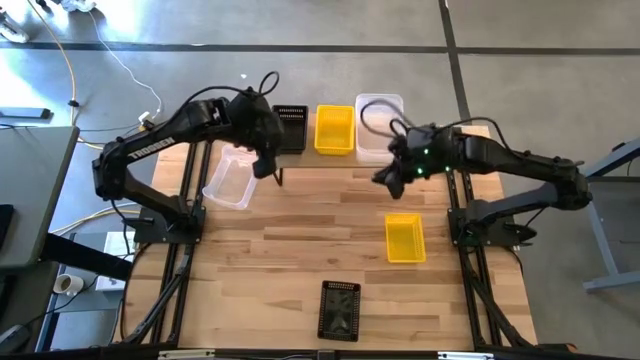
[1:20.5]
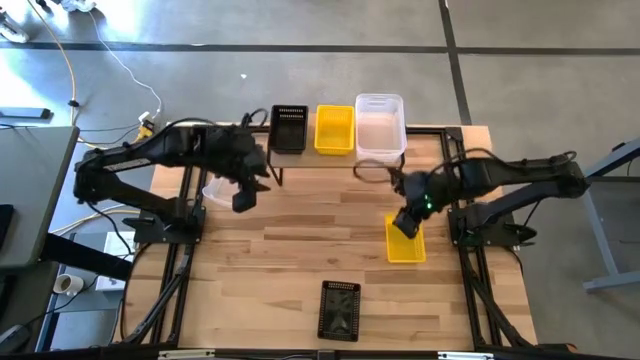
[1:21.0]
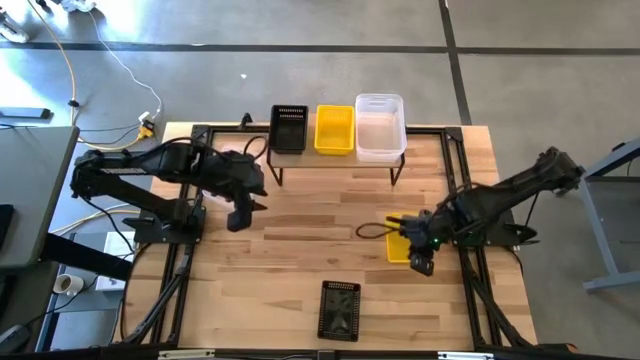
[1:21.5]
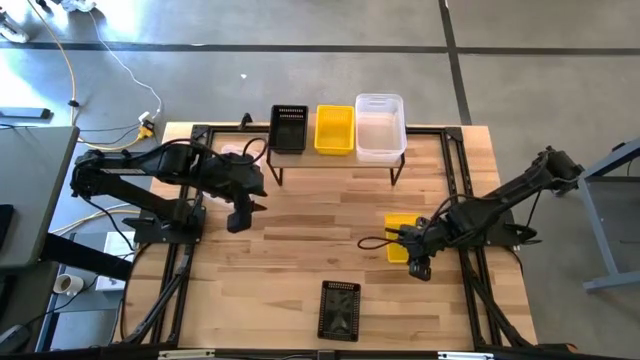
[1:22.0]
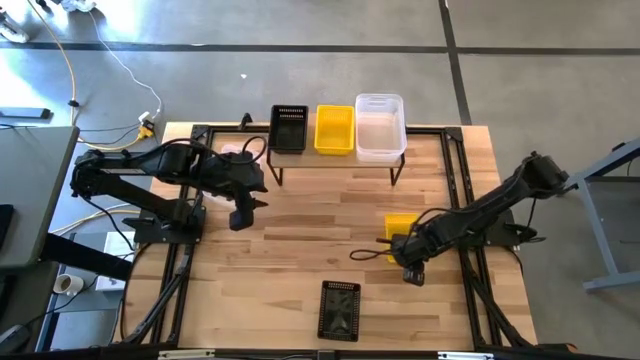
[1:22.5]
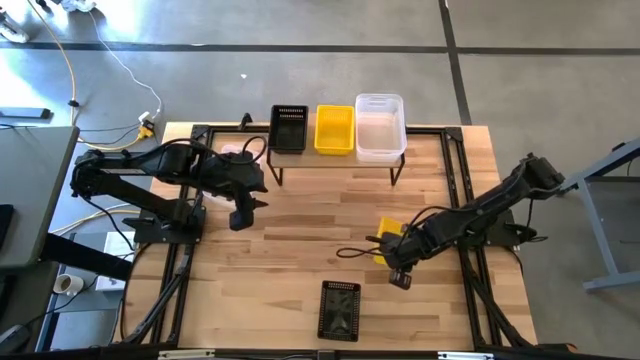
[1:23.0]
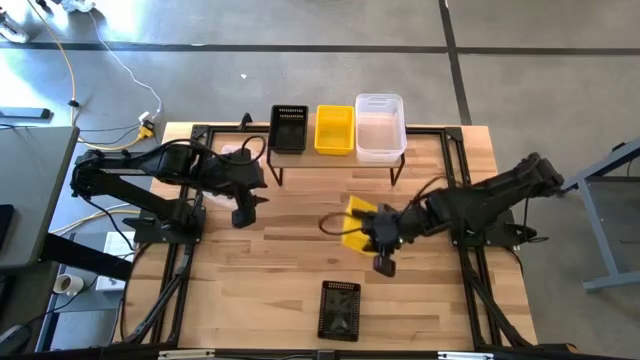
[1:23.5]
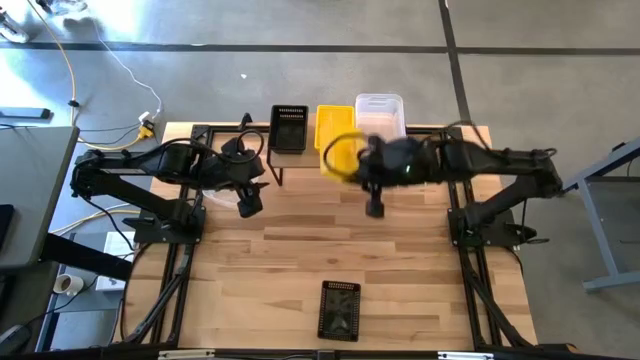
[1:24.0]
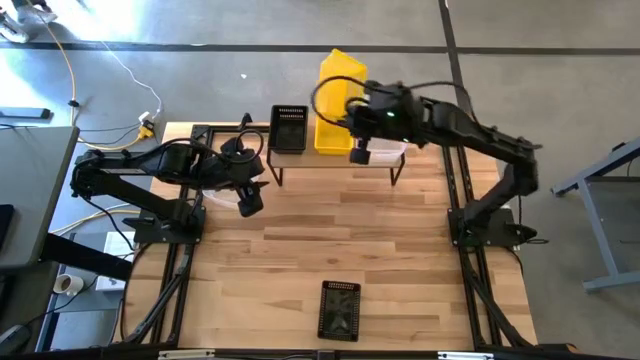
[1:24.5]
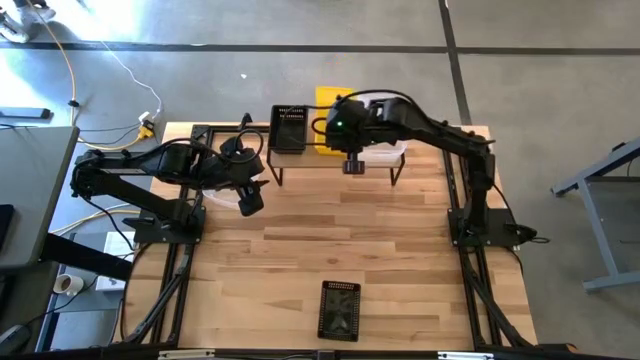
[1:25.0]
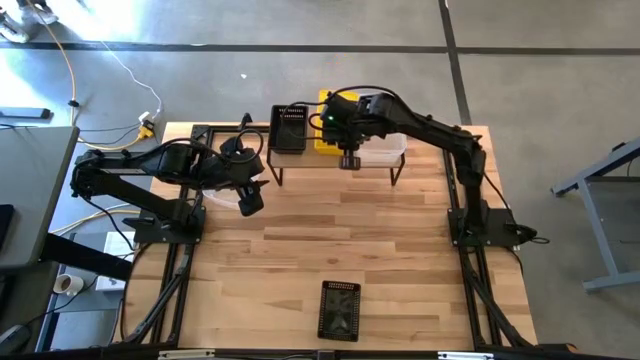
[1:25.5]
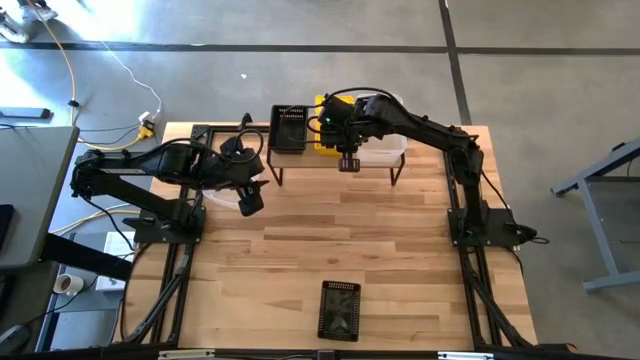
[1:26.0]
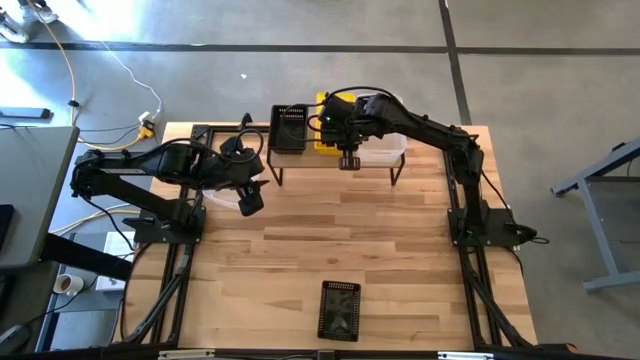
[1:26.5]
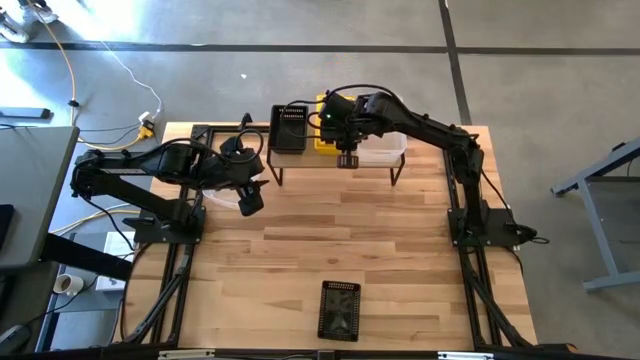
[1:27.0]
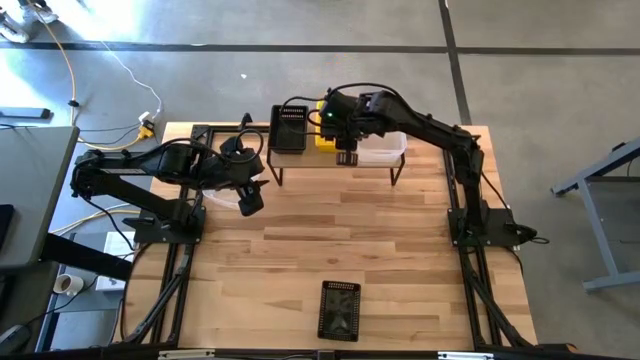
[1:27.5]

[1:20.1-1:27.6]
Task: Stack baskets on shelf by color
Stack the yellow basket on top of the yellow baskets on the shelf

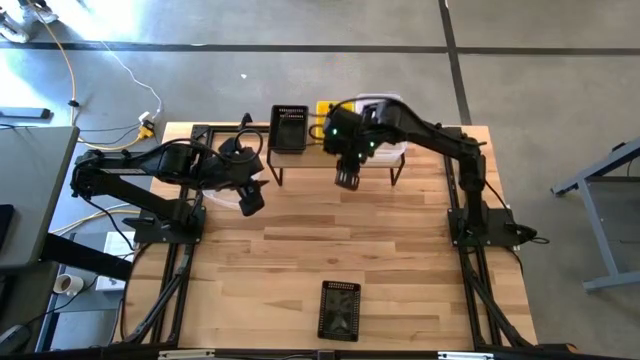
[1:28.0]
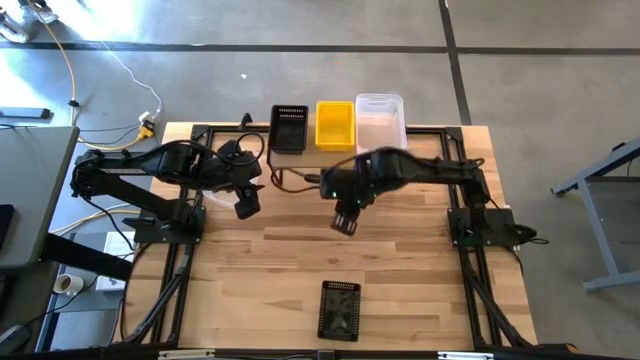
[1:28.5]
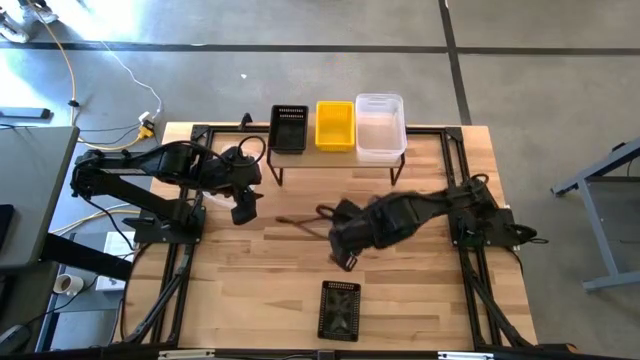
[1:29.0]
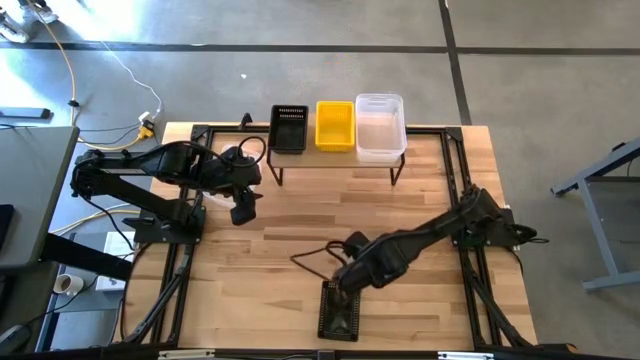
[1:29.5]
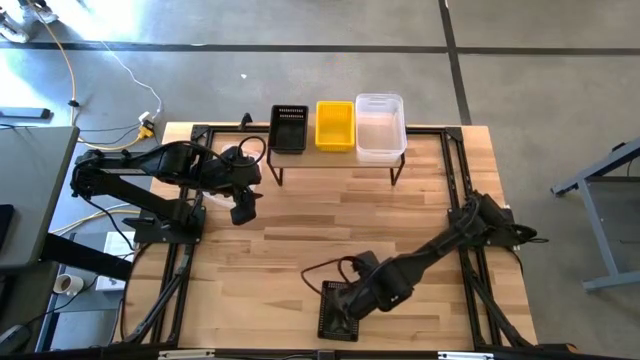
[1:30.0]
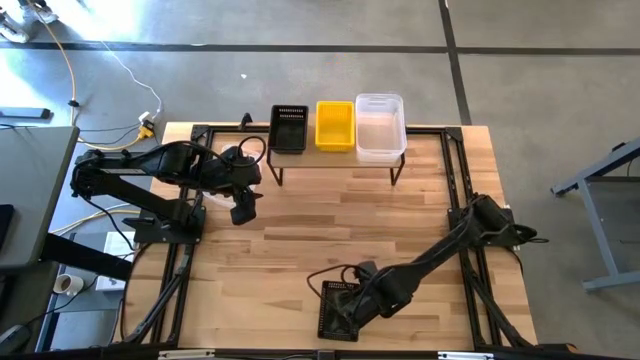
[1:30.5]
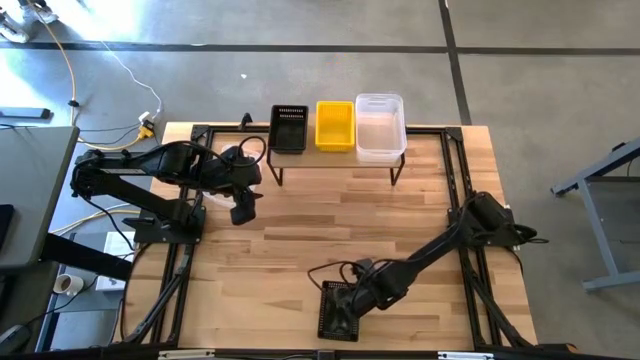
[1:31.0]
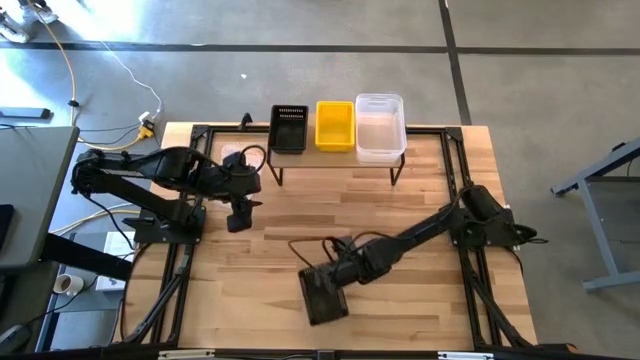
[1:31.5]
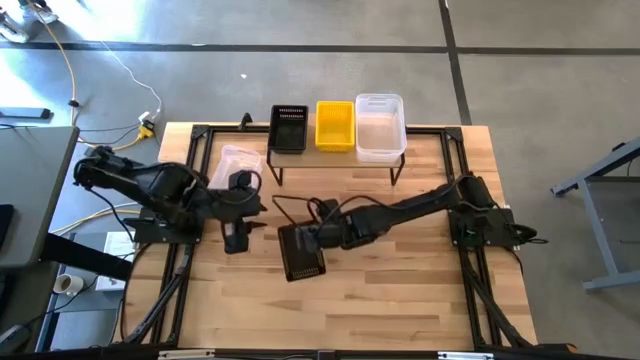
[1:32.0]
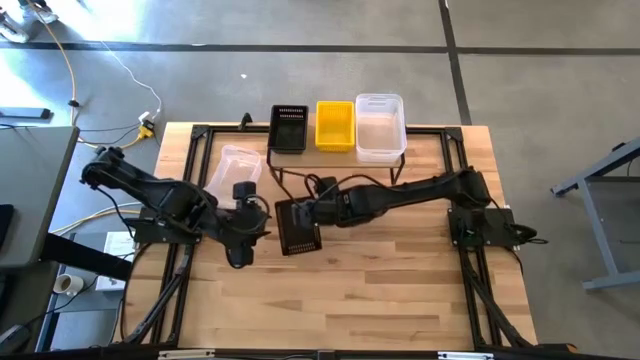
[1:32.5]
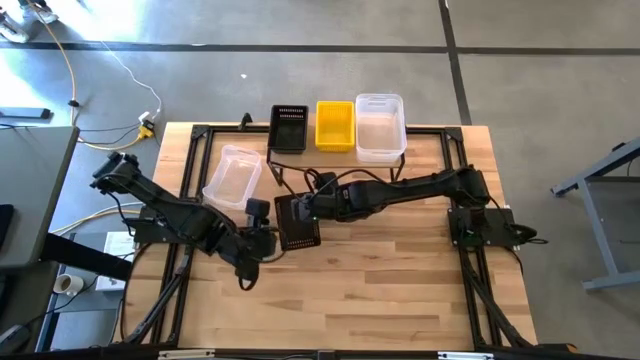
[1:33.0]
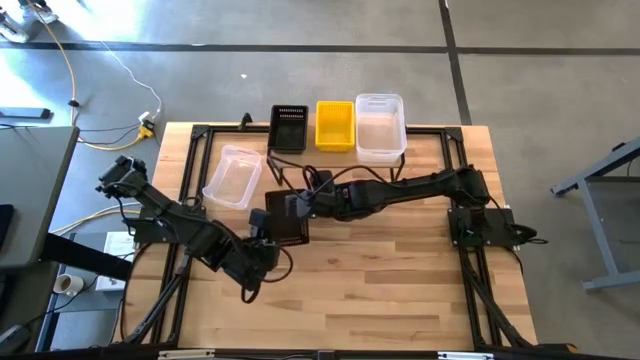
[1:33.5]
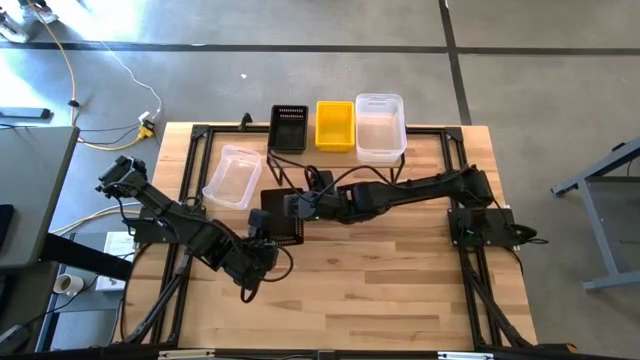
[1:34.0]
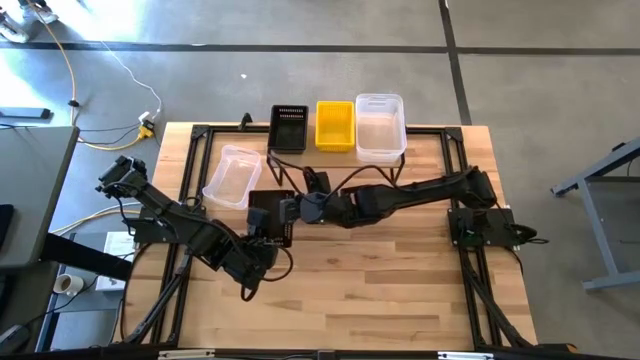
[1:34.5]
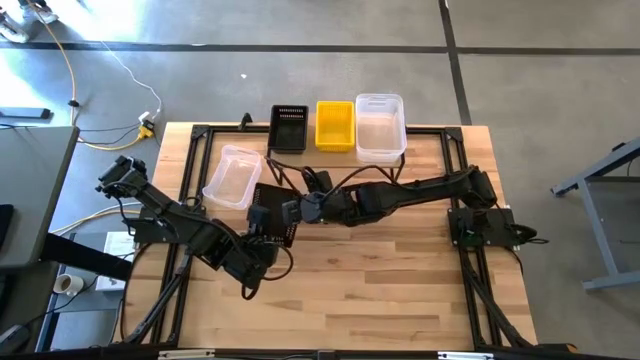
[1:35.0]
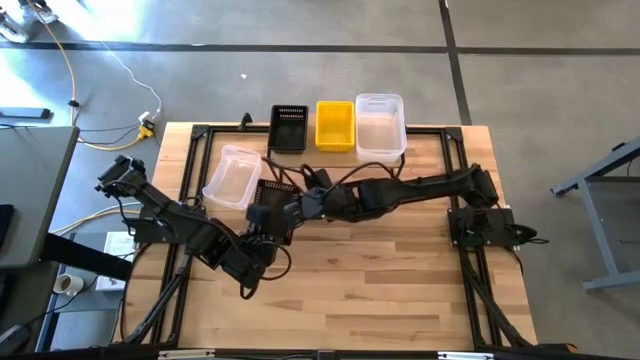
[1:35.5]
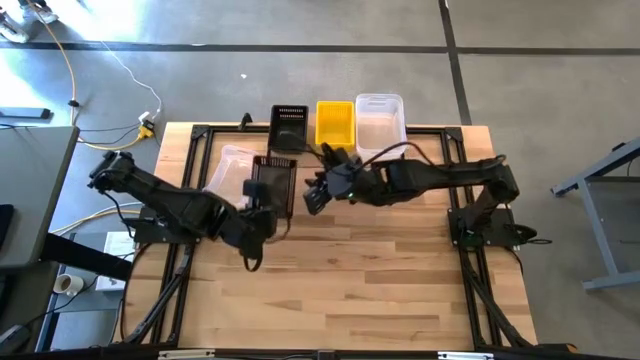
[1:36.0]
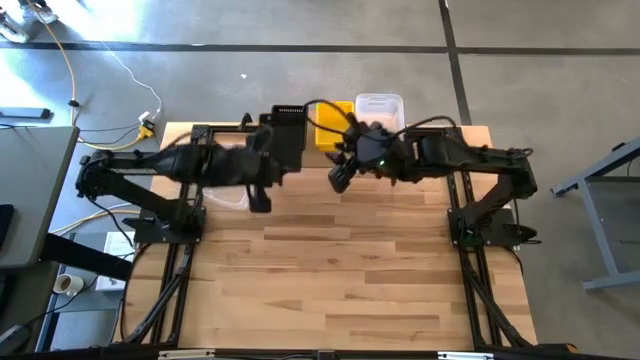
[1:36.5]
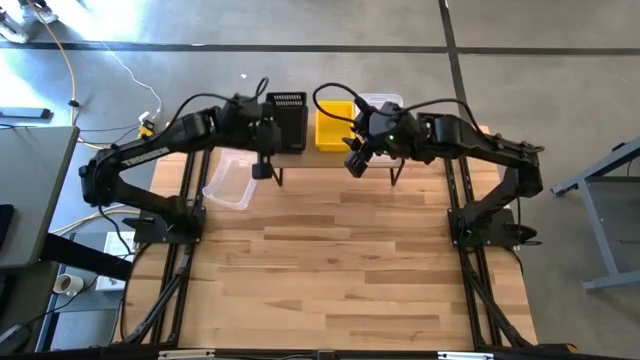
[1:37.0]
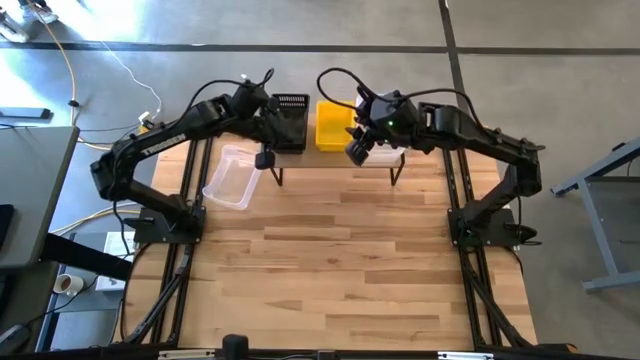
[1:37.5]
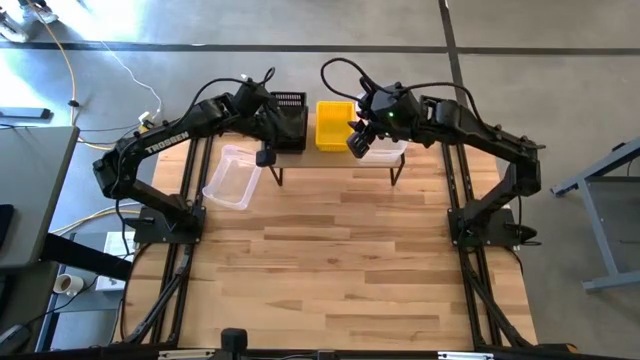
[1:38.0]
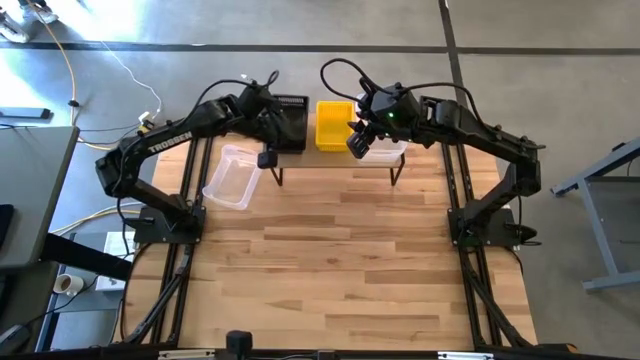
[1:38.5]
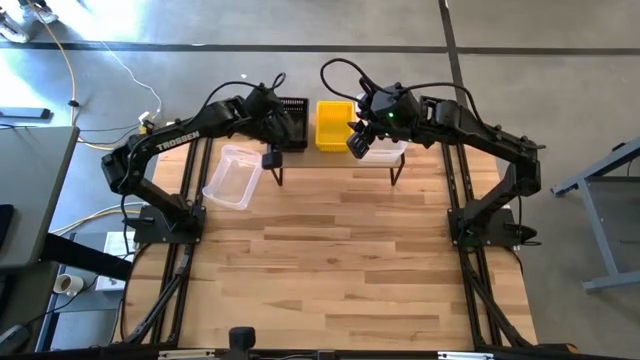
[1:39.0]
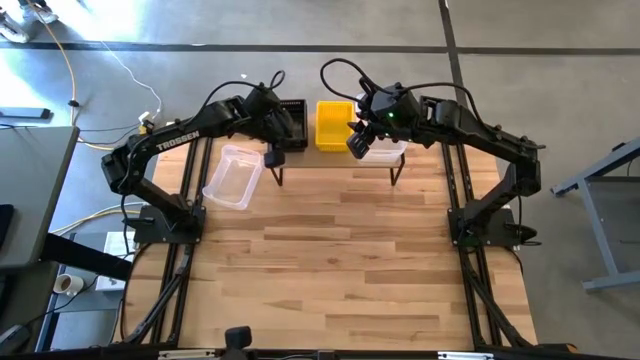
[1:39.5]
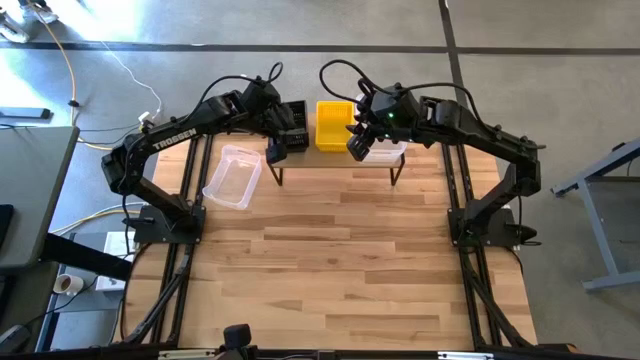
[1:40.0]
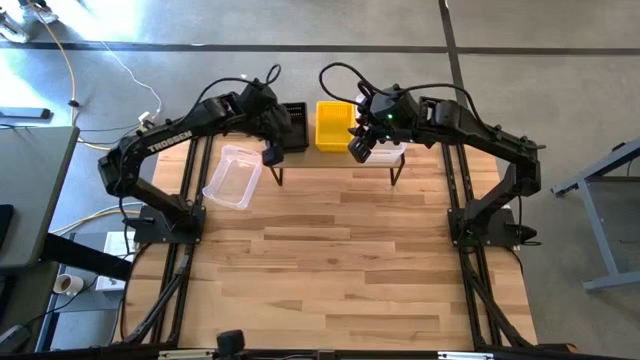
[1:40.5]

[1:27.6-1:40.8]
Stack the black basket on top of the black basket on the shelf

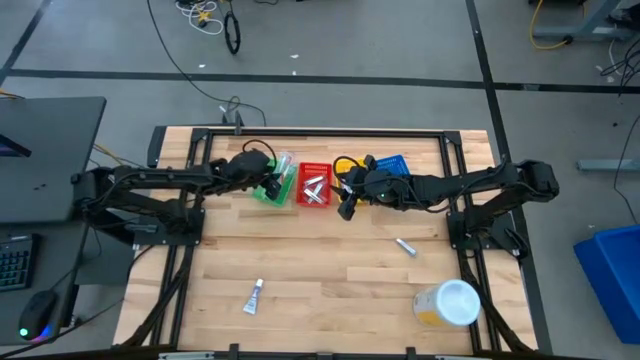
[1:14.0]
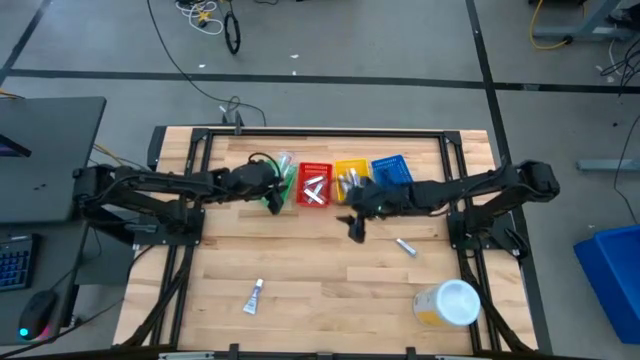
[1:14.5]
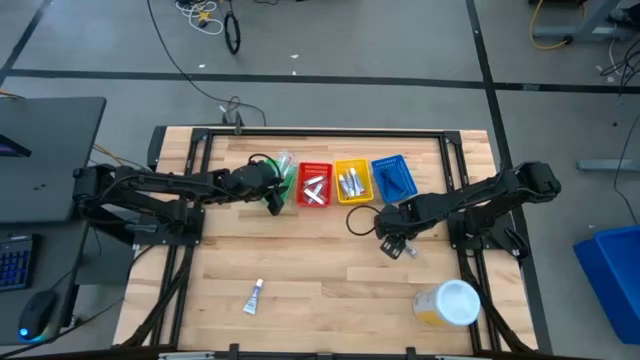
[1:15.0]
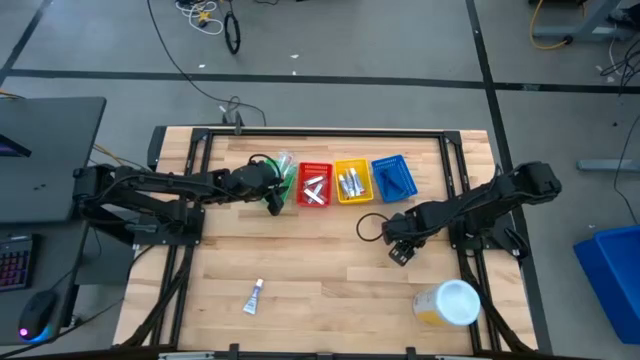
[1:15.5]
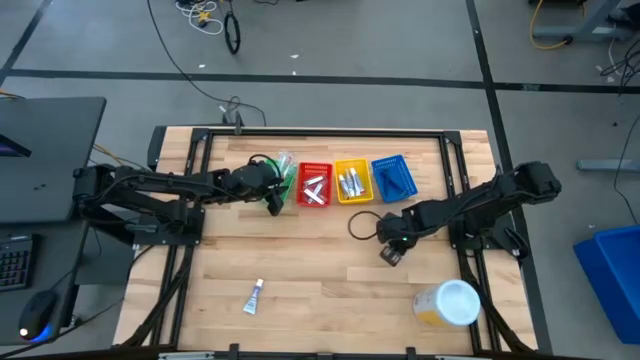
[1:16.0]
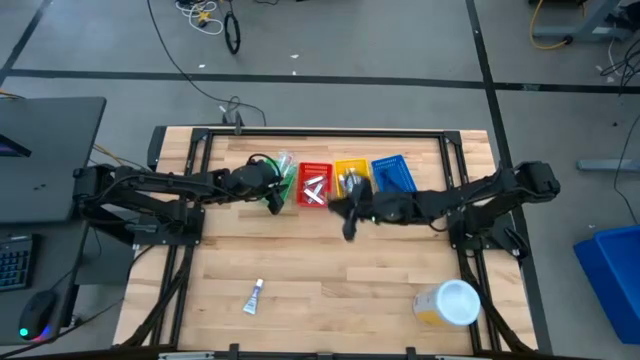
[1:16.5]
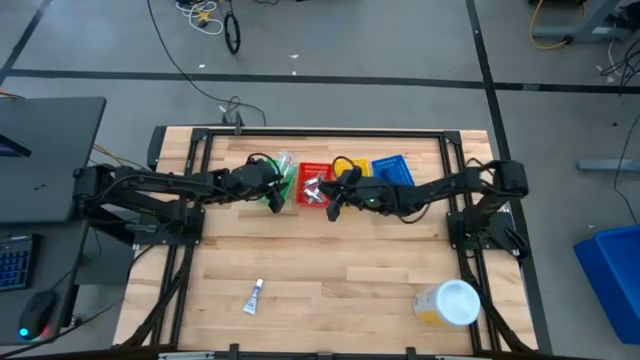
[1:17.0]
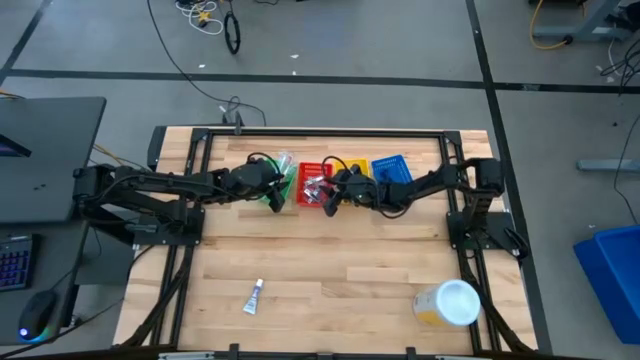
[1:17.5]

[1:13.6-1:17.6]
Task: Pick & Place Travel size toiletries
Put the silver nail cutter into the red bin
